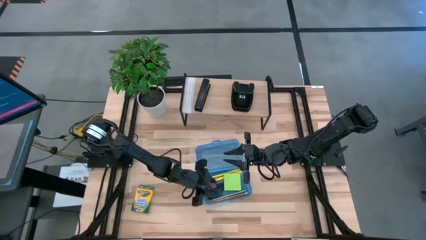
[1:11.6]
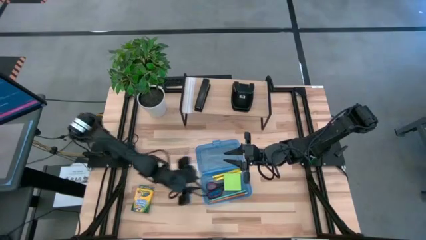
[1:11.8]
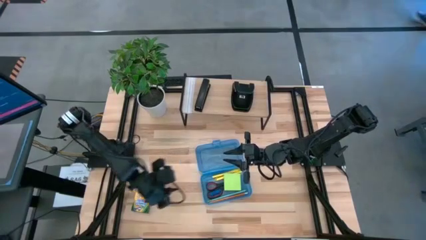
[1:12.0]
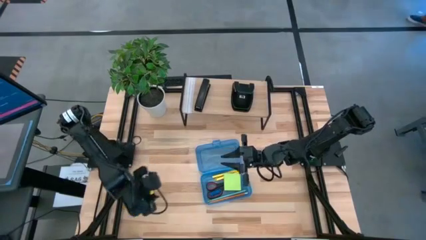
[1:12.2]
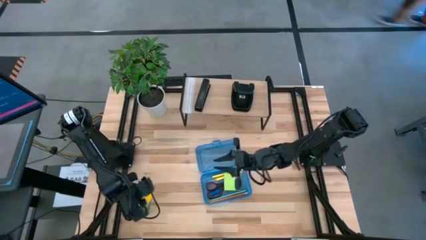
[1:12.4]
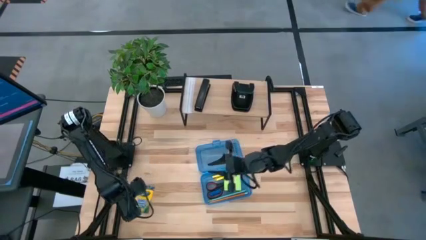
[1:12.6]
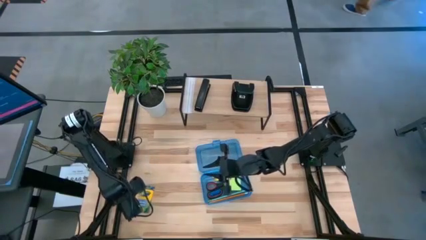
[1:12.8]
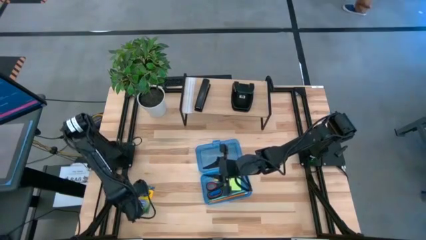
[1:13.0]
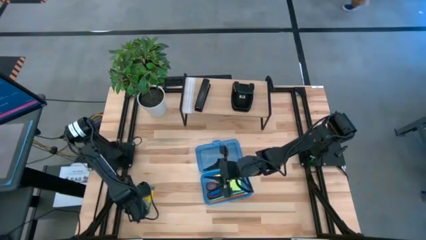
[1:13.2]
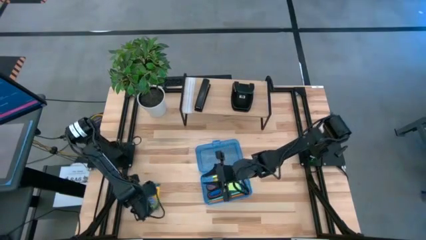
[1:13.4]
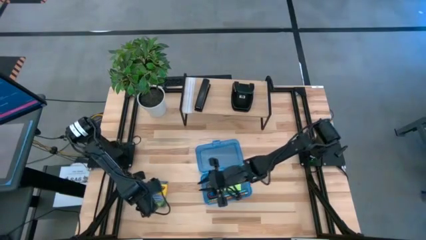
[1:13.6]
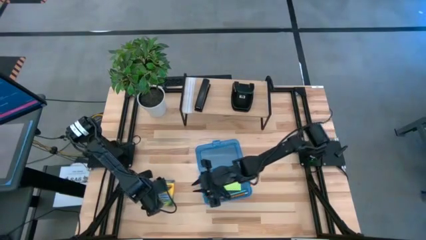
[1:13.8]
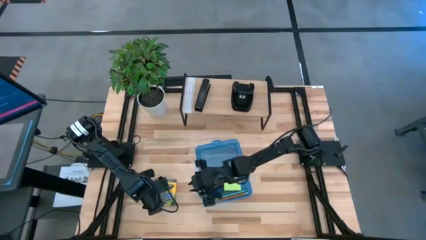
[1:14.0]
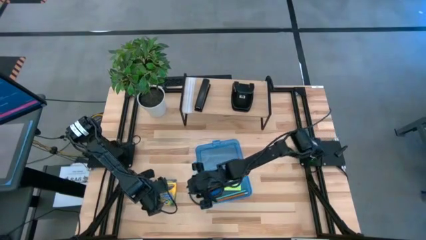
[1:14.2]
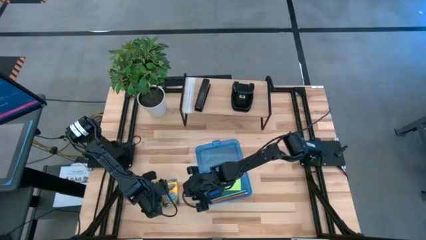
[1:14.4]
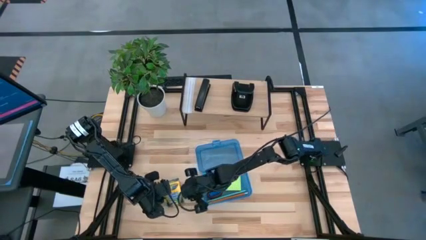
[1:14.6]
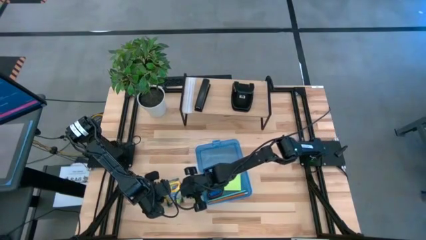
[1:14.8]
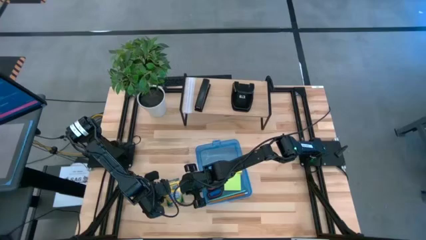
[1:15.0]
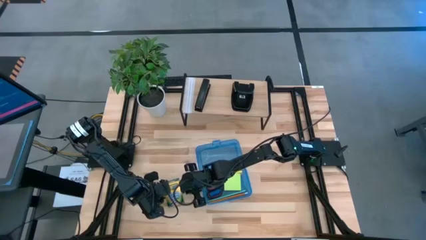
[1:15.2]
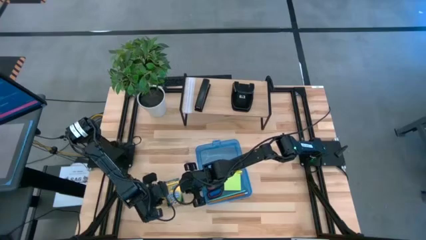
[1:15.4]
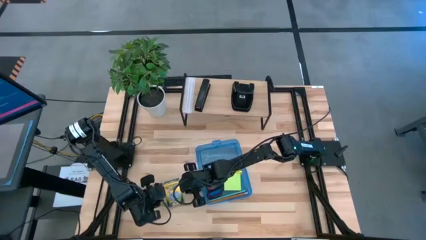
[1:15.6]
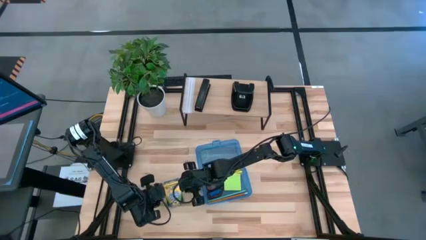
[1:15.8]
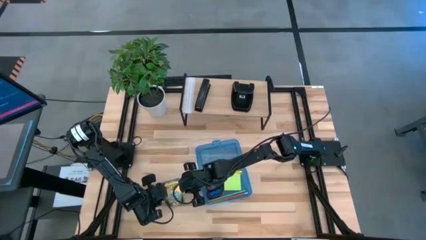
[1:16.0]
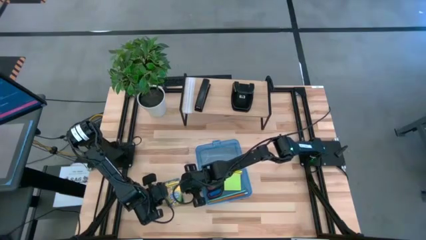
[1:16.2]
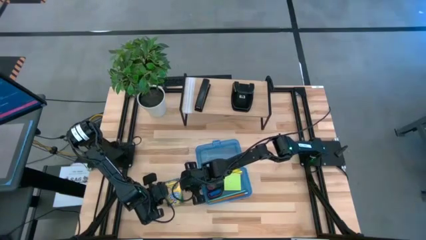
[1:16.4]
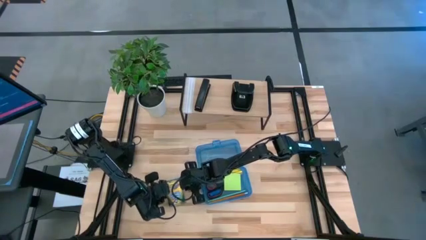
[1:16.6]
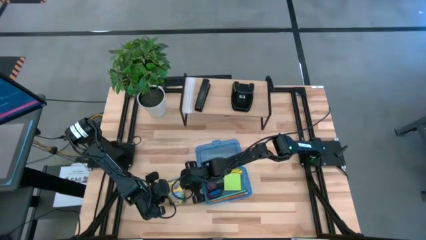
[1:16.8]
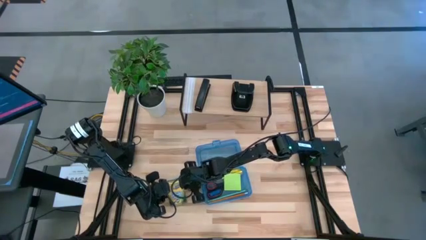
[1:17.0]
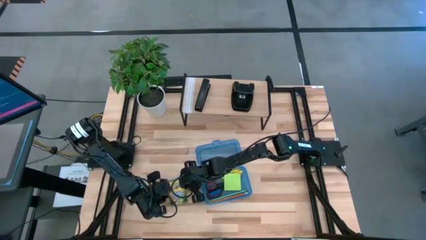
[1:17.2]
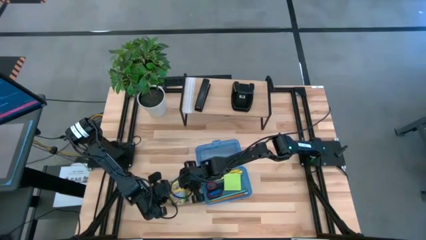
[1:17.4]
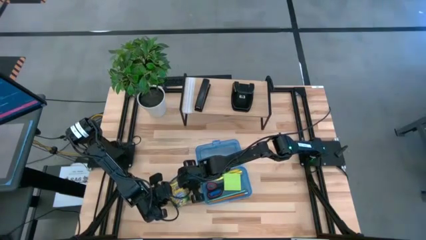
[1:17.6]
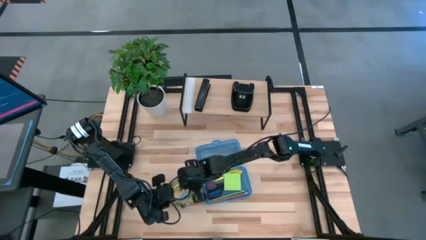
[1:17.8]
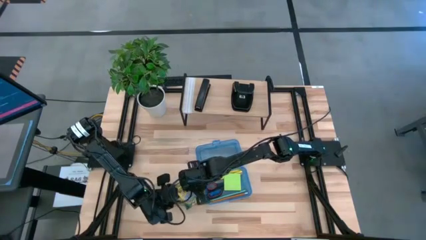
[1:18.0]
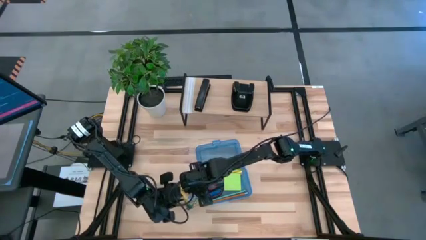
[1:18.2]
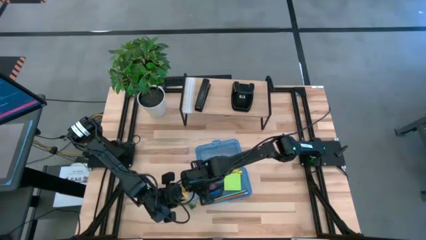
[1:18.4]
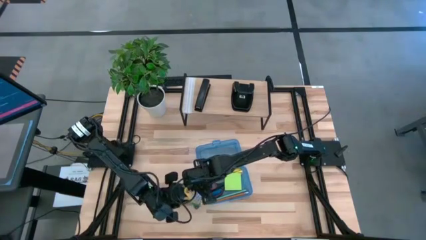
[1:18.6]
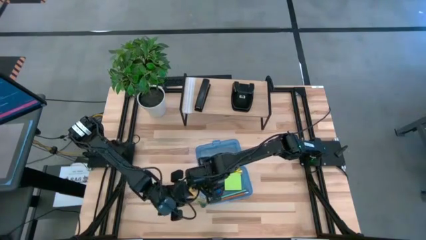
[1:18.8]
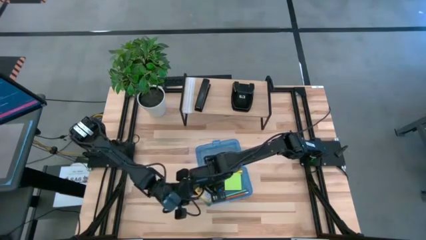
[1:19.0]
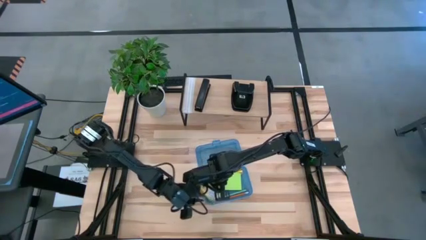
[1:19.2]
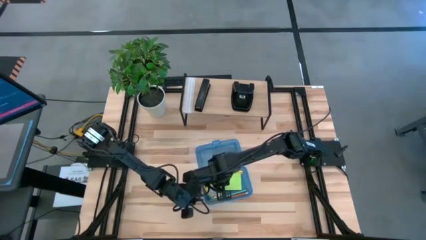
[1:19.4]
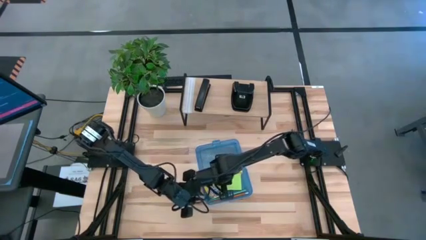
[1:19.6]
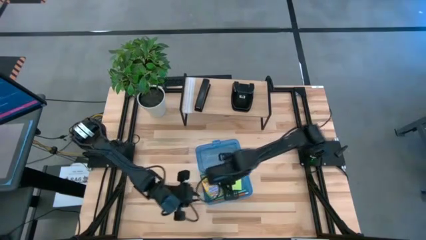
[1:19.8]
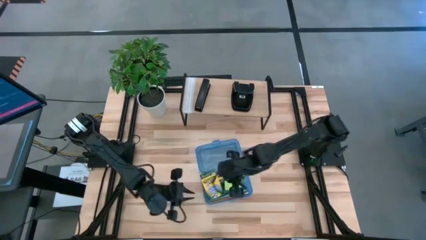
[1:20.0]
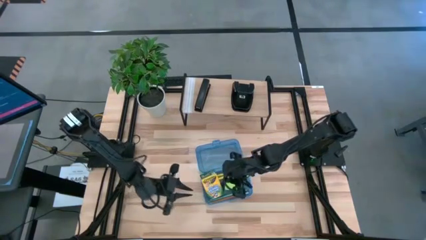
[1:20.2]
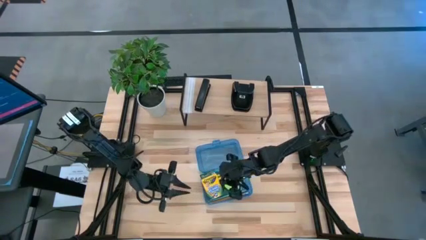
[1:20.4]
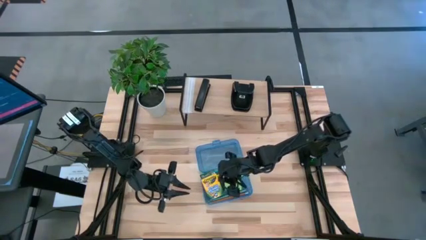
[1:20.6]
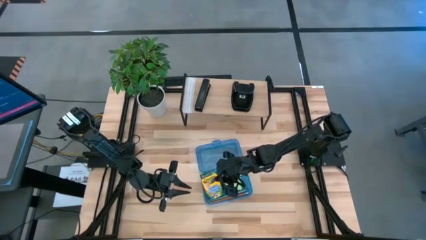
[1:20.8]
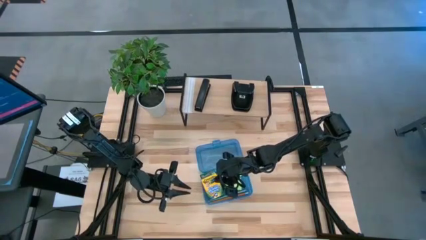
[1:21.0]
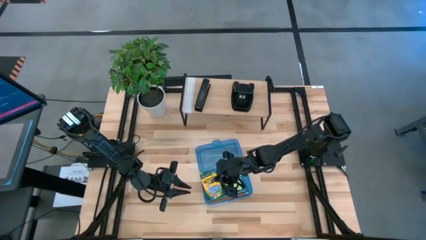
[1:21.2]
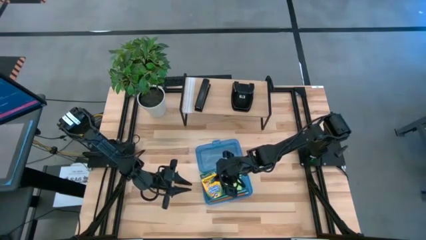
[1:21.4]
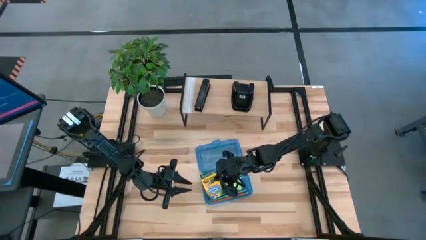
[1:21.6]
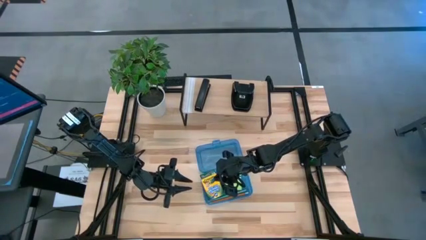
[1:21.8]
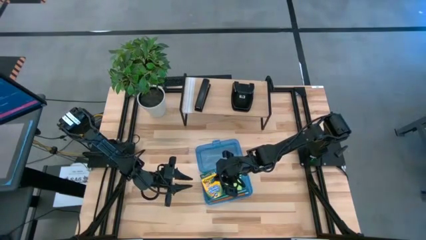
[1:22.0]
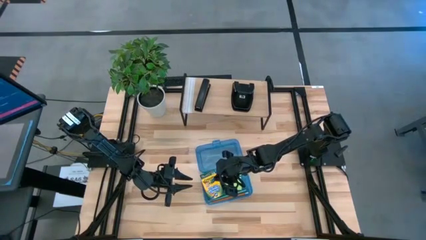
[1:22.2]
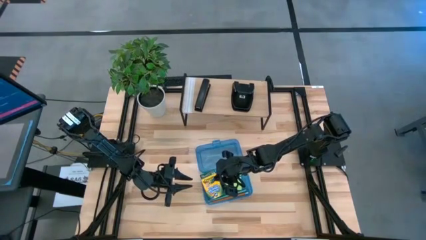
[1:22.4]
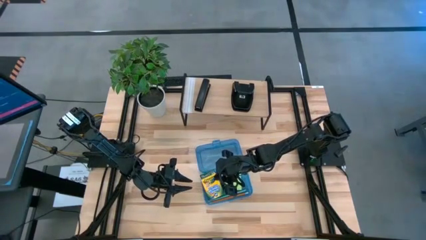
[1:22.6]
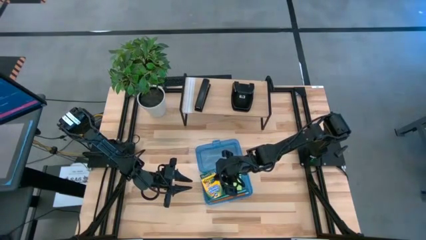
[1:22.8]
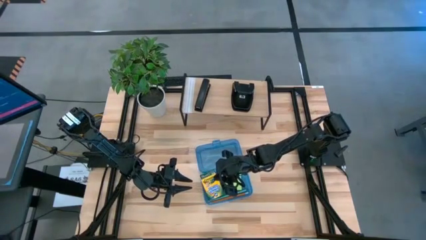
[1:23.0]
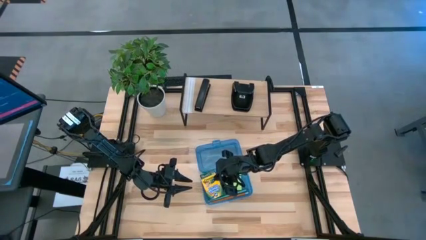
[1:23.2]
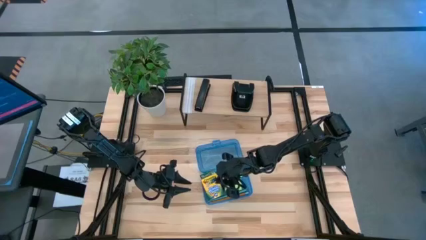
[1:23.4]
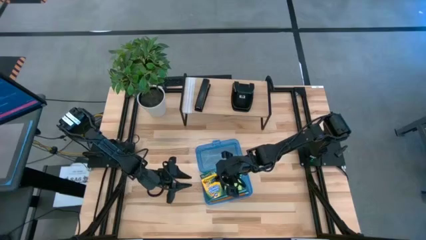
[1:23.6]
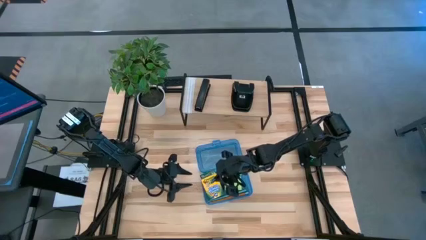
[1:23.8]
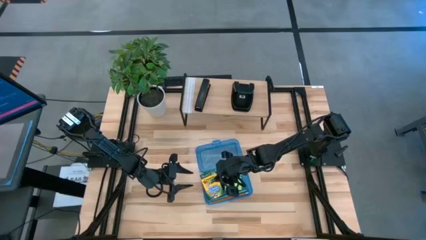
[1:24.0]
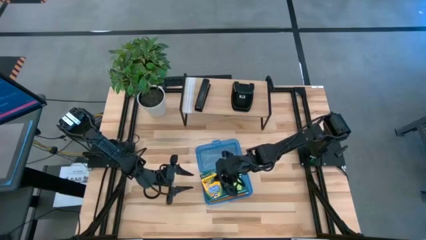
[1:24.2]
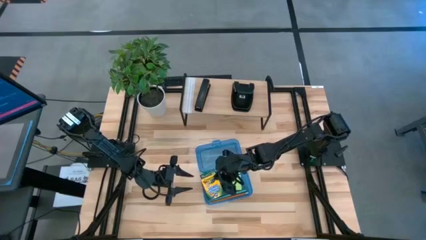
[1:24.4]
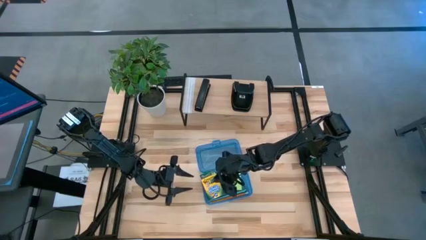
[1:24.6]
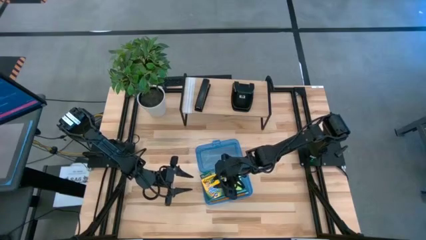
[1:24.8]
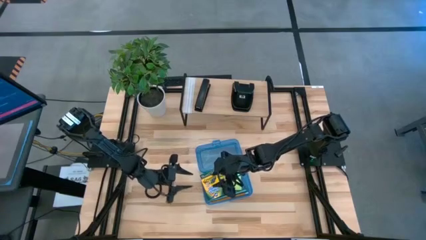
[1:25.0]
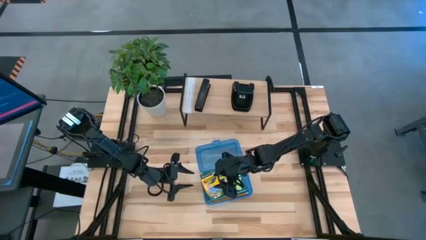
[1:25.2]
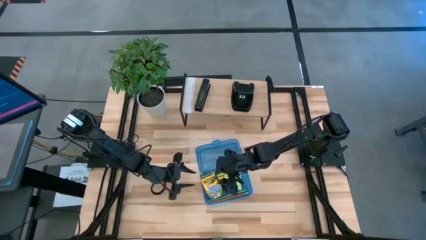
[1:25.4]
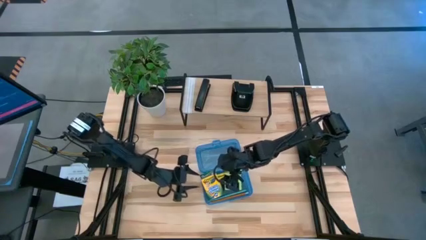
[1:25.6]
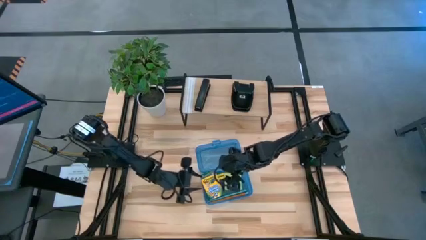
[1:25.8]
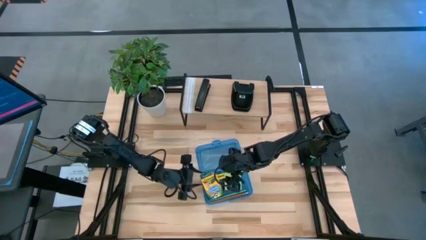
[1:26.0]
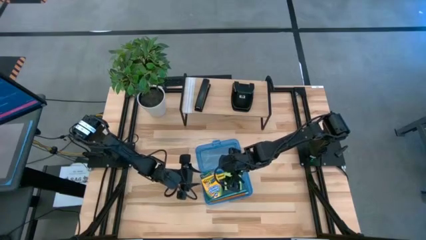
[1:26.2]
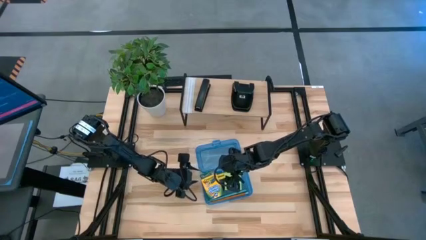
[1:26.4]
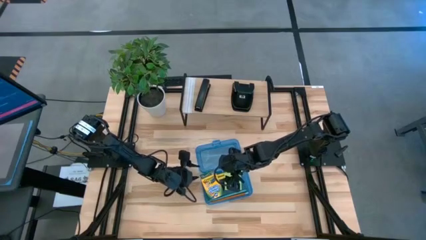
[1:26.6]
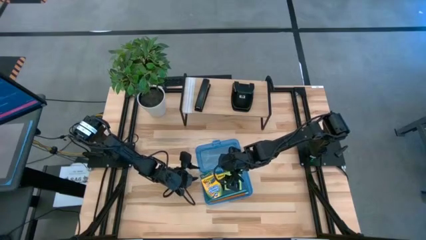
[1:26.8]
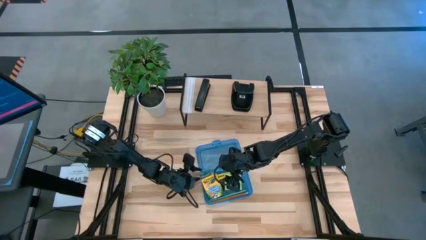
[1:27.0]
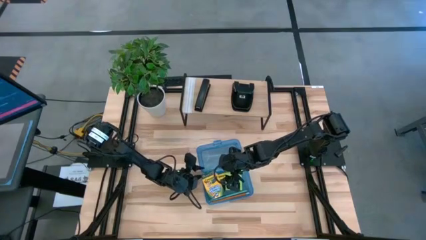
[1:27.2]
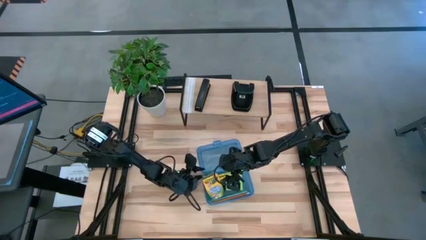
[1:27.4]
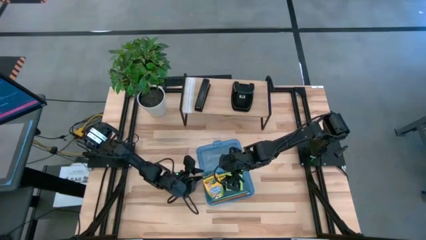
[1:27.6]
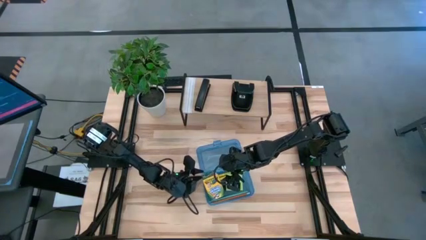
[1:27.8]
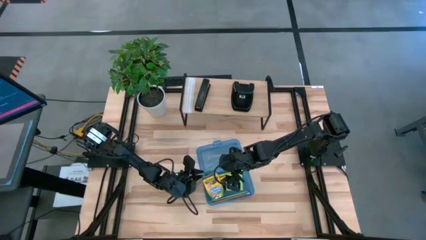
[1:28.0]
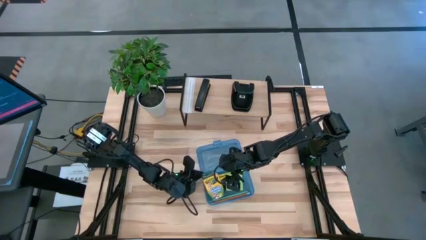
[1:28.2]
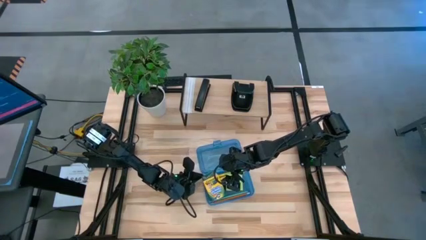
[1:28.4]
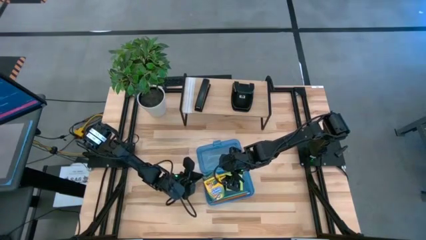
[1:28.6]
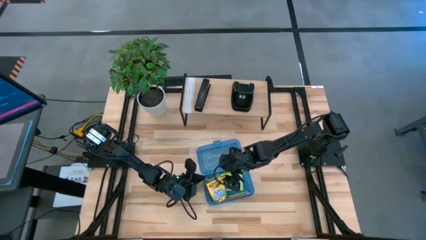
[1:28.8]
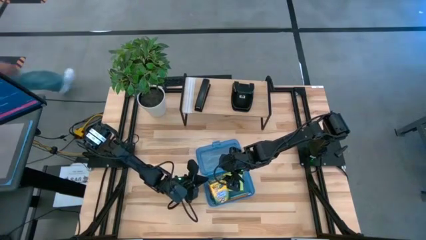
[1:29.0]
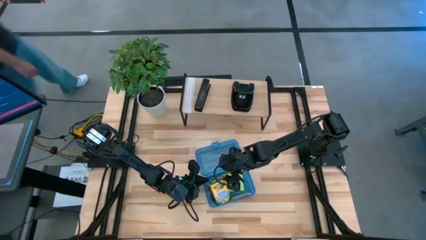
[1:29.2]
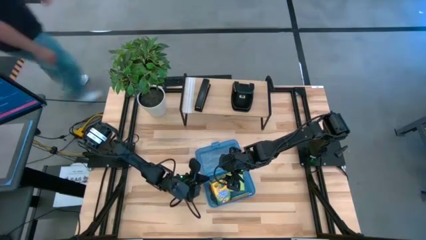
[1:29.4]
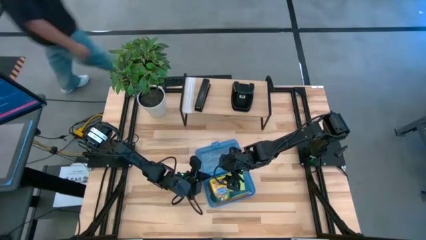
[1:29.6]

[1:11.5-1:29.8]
Task: Pack school essentials
Put the yellow crayon box into the blue supply box
